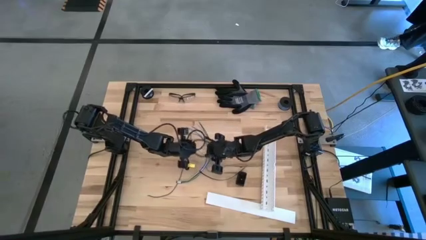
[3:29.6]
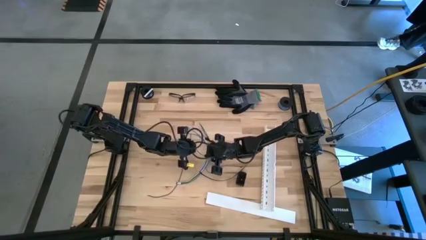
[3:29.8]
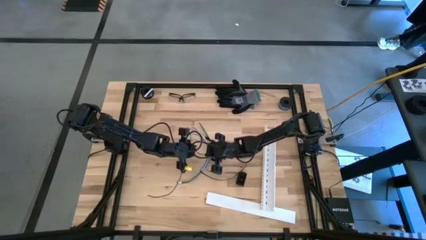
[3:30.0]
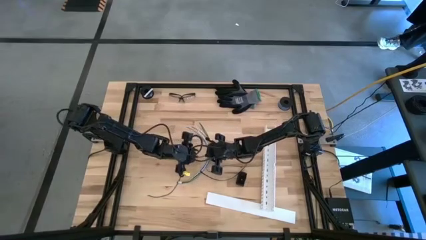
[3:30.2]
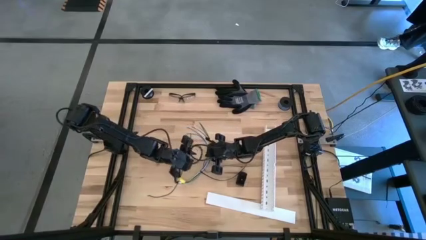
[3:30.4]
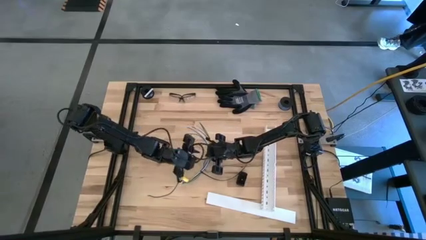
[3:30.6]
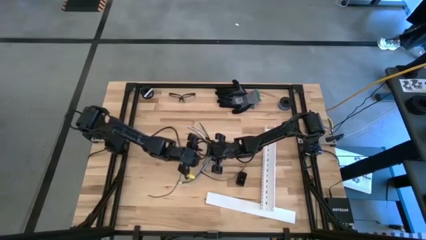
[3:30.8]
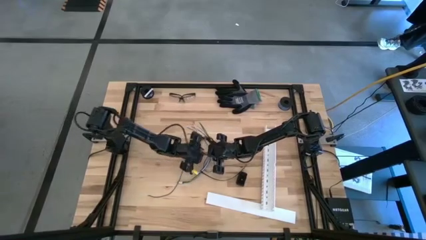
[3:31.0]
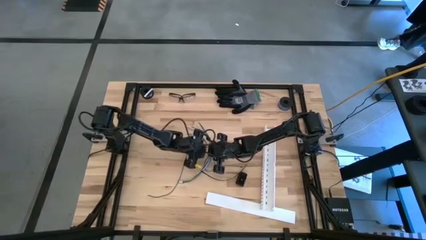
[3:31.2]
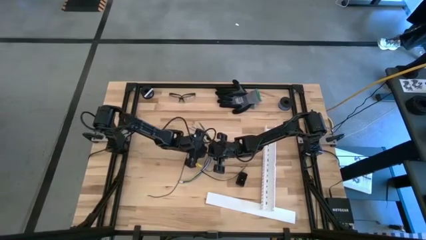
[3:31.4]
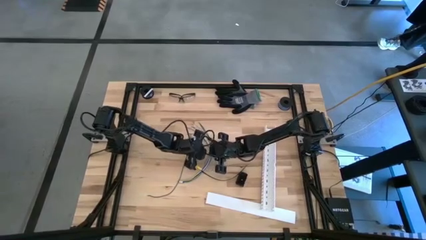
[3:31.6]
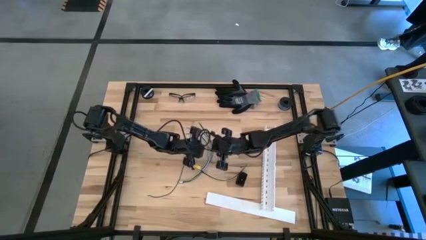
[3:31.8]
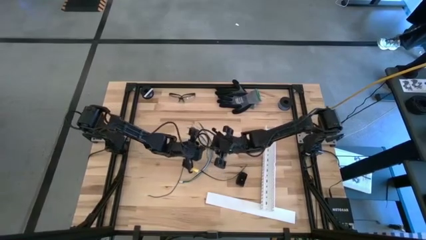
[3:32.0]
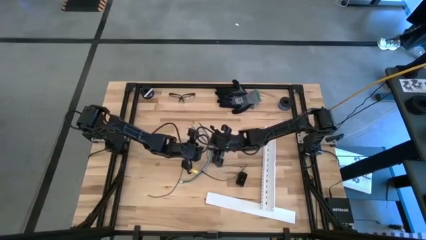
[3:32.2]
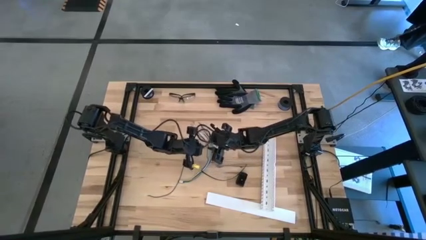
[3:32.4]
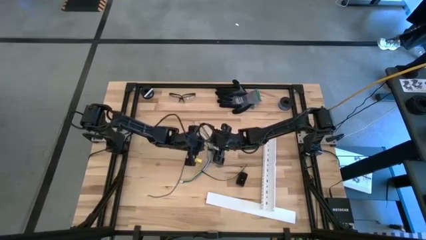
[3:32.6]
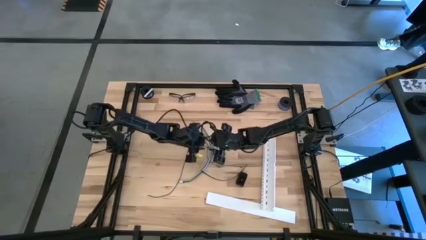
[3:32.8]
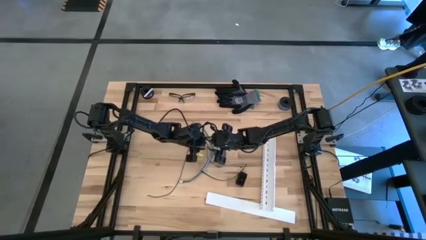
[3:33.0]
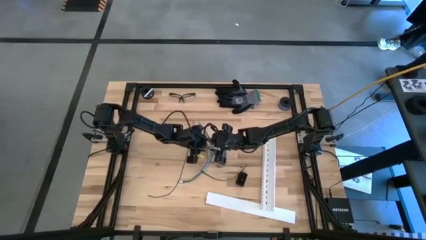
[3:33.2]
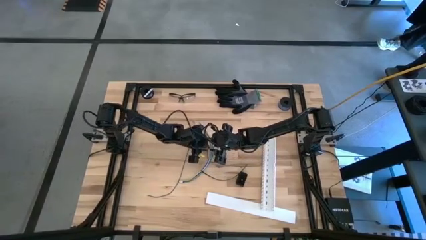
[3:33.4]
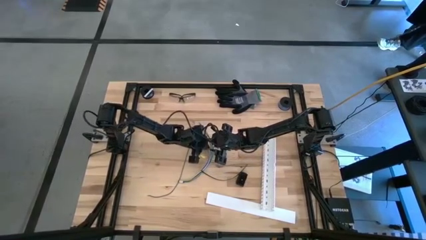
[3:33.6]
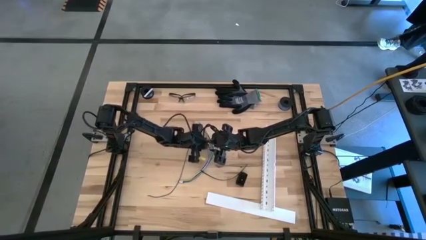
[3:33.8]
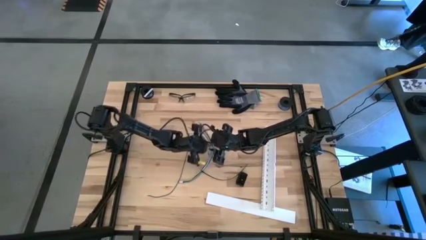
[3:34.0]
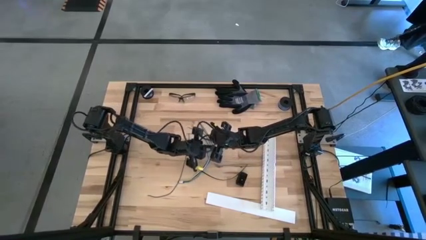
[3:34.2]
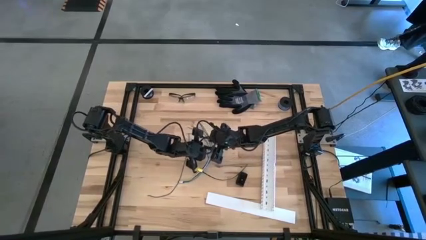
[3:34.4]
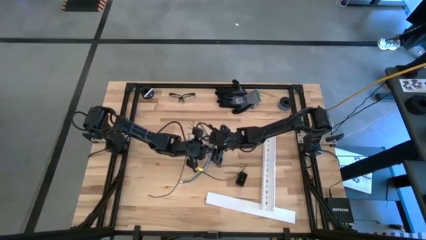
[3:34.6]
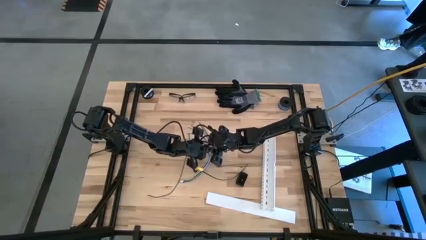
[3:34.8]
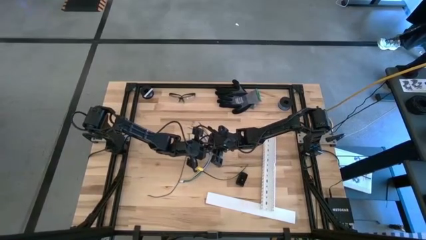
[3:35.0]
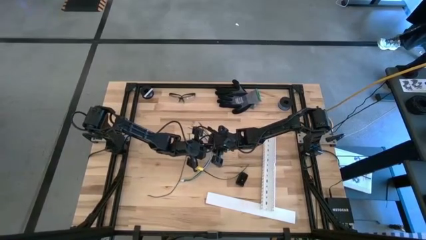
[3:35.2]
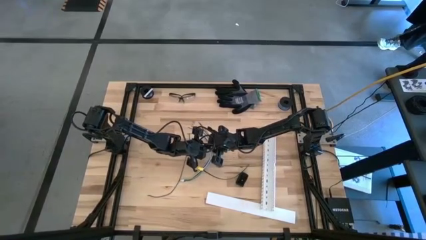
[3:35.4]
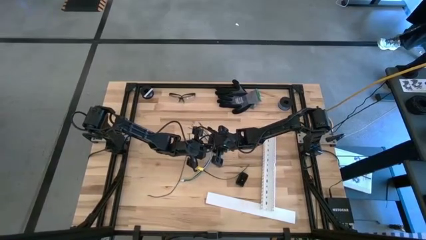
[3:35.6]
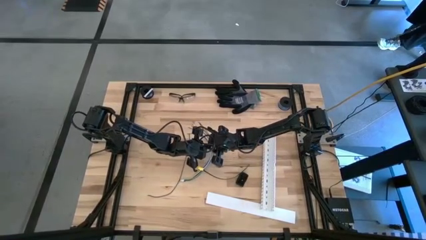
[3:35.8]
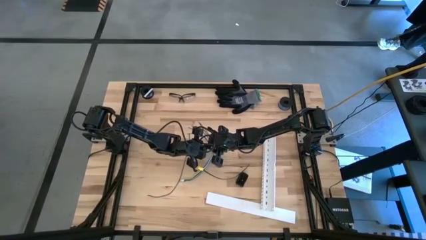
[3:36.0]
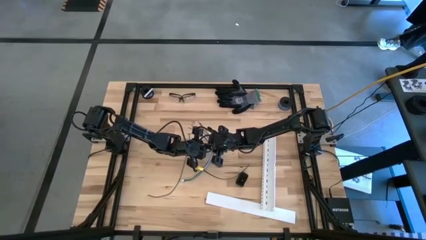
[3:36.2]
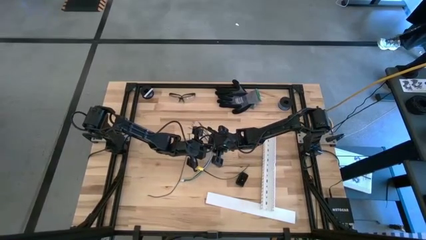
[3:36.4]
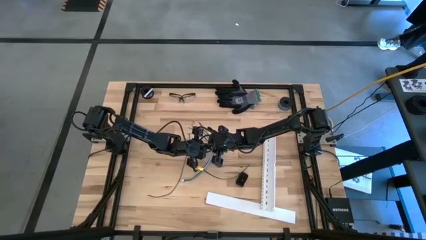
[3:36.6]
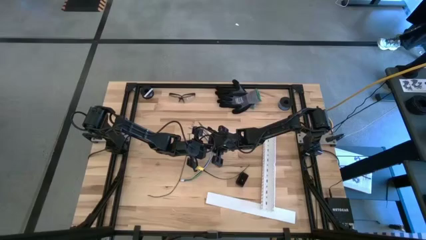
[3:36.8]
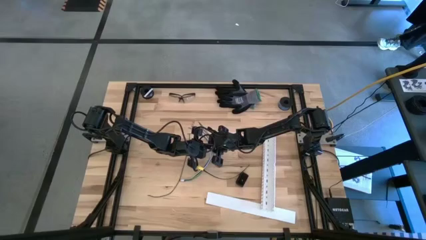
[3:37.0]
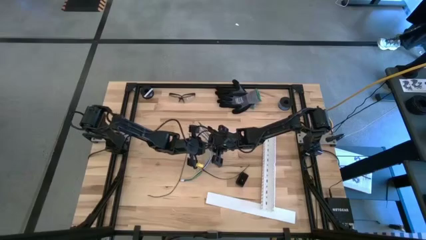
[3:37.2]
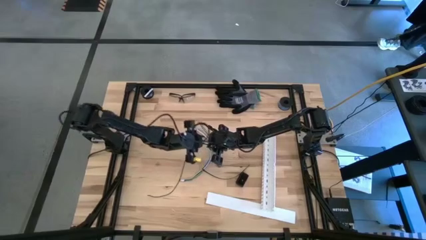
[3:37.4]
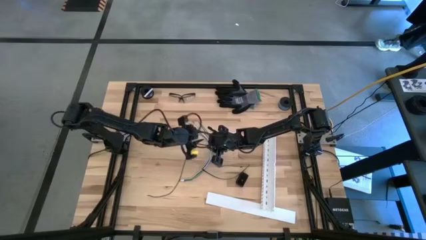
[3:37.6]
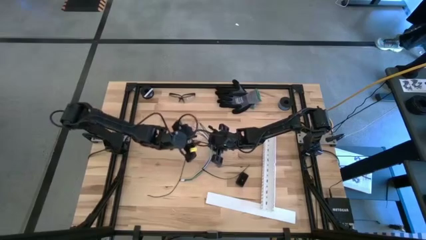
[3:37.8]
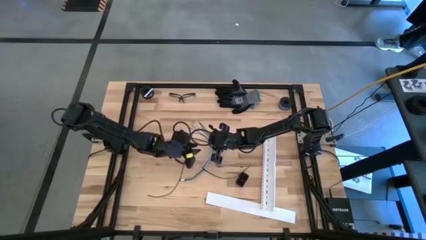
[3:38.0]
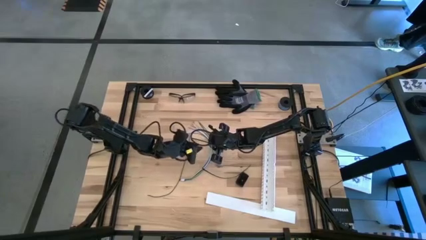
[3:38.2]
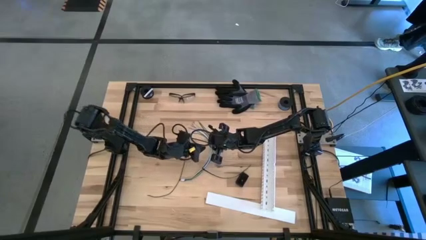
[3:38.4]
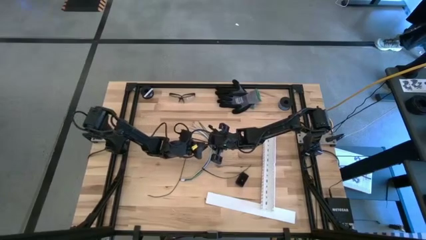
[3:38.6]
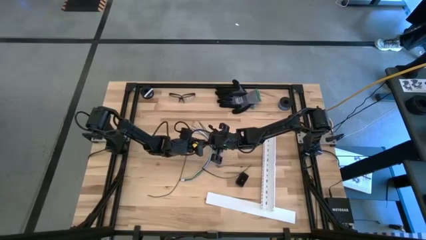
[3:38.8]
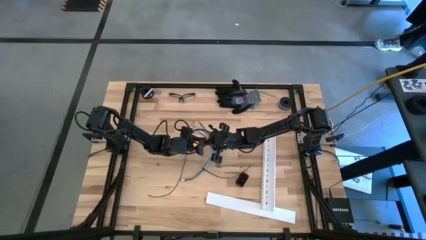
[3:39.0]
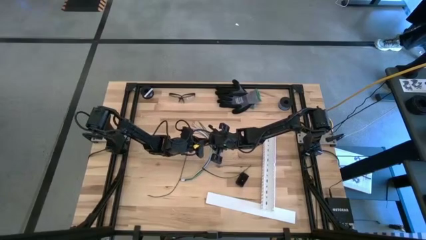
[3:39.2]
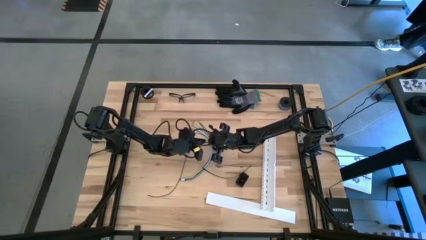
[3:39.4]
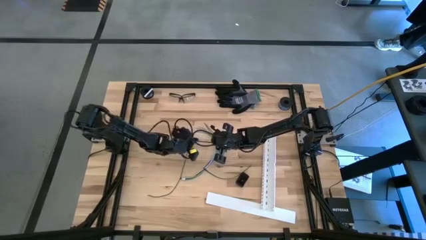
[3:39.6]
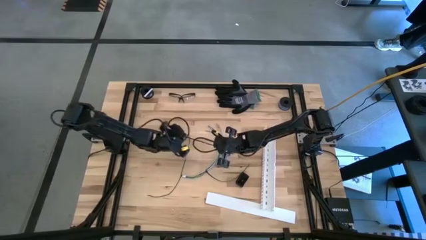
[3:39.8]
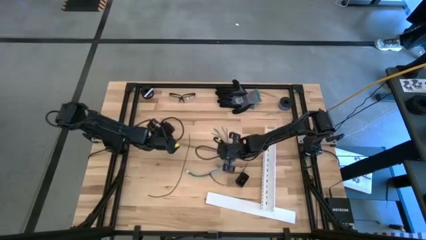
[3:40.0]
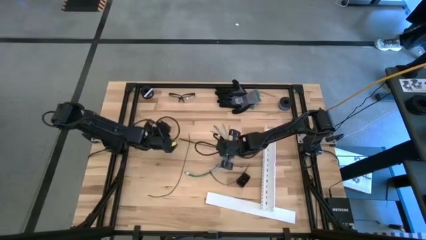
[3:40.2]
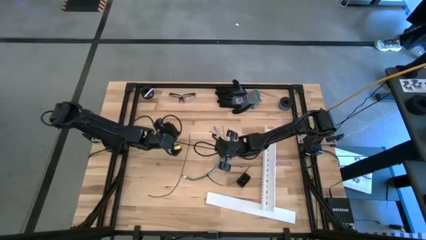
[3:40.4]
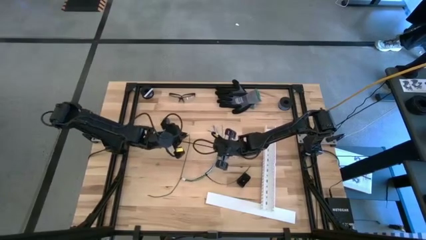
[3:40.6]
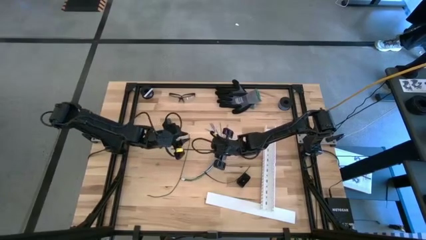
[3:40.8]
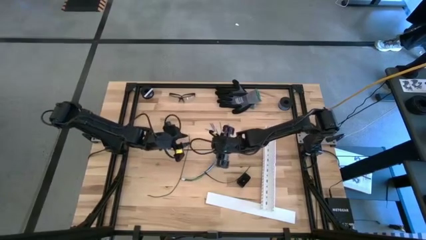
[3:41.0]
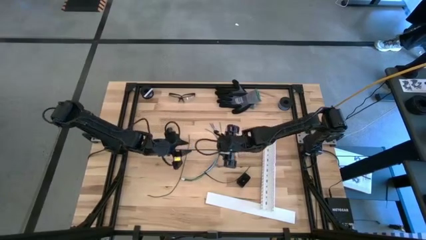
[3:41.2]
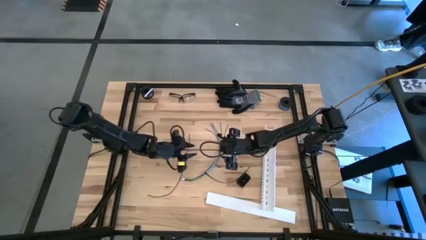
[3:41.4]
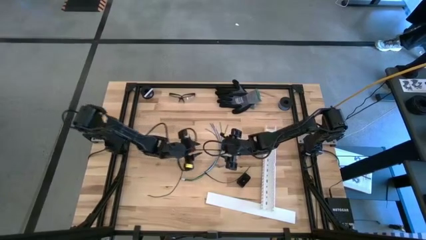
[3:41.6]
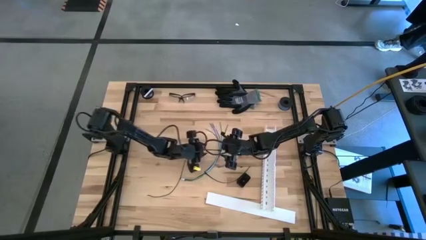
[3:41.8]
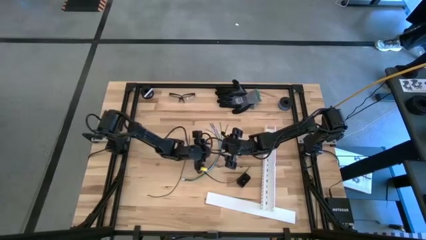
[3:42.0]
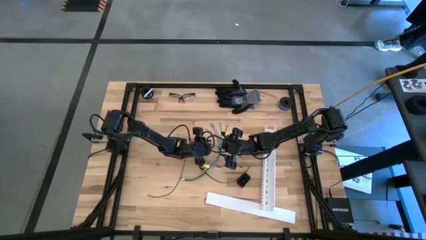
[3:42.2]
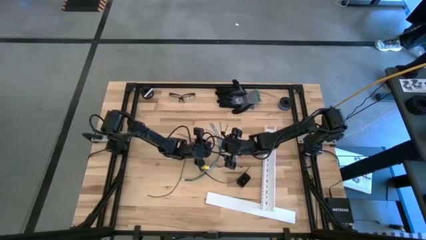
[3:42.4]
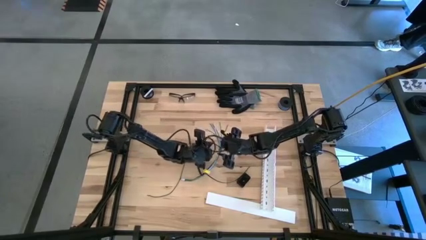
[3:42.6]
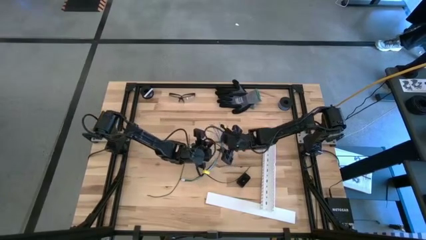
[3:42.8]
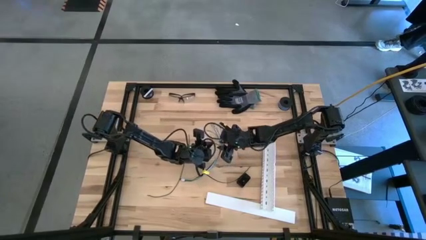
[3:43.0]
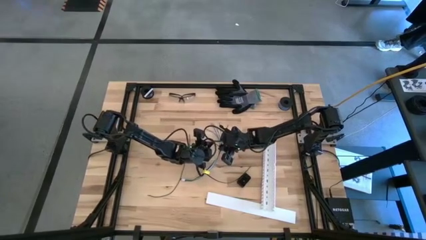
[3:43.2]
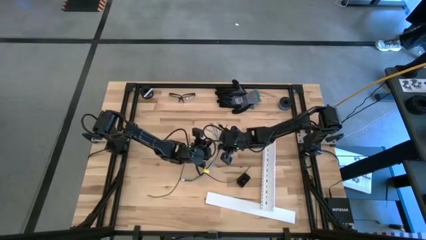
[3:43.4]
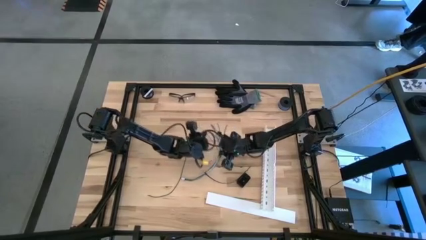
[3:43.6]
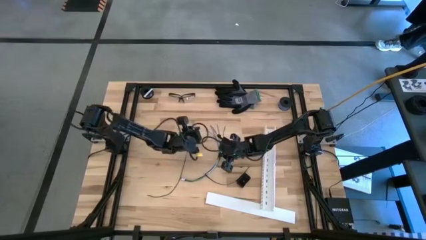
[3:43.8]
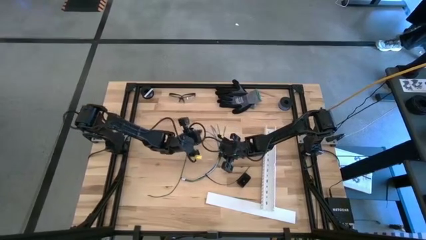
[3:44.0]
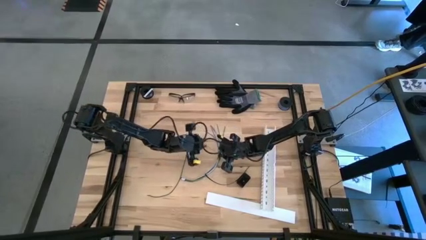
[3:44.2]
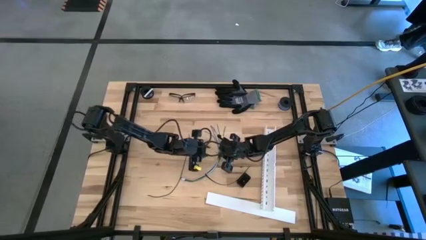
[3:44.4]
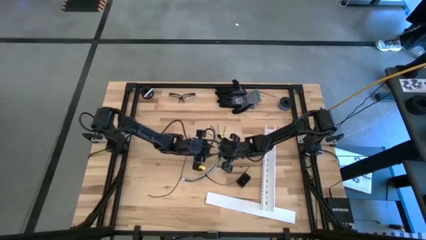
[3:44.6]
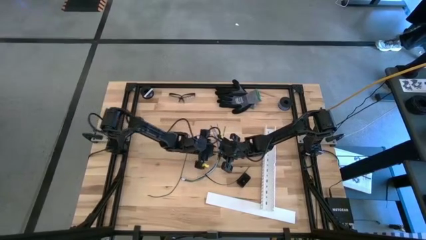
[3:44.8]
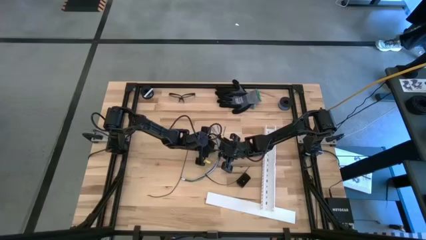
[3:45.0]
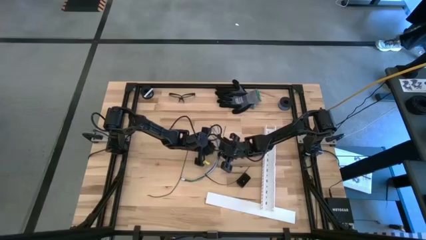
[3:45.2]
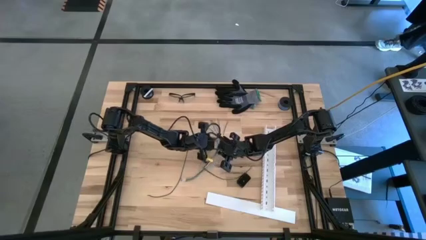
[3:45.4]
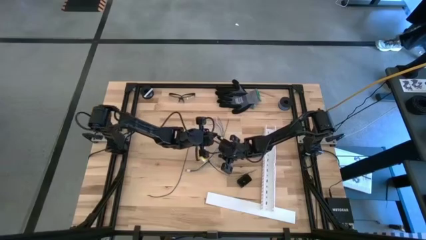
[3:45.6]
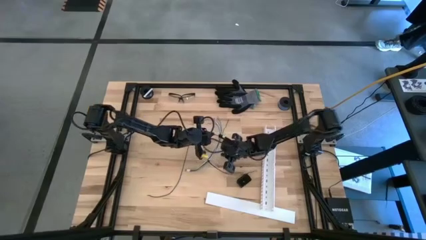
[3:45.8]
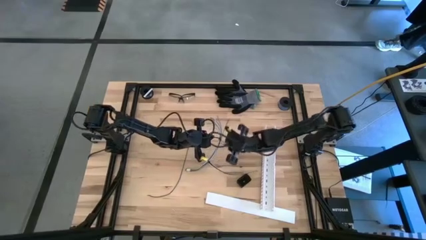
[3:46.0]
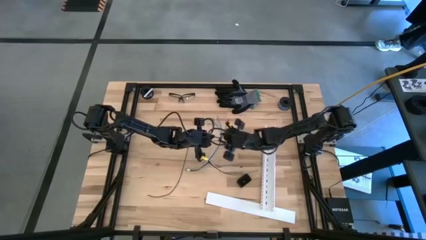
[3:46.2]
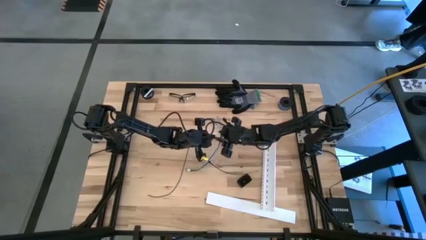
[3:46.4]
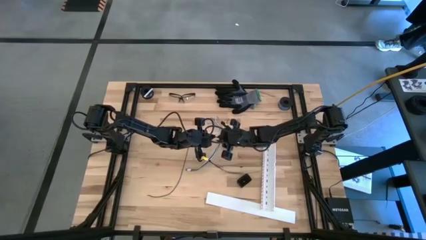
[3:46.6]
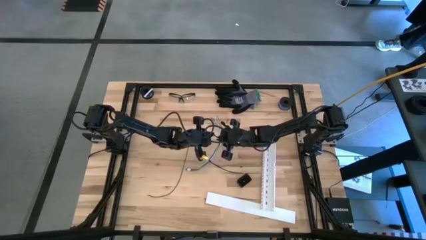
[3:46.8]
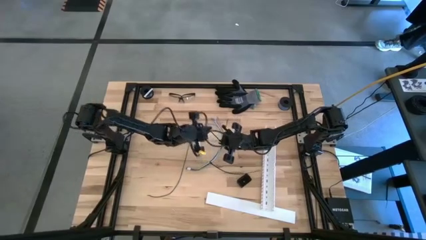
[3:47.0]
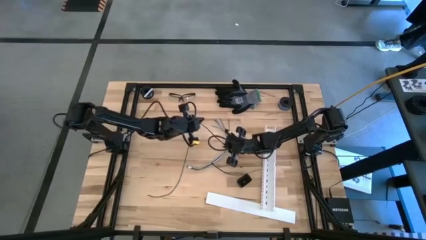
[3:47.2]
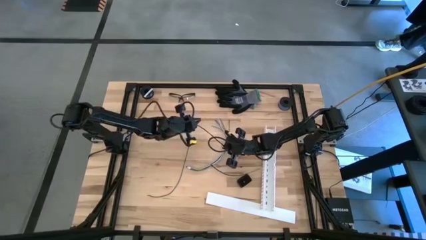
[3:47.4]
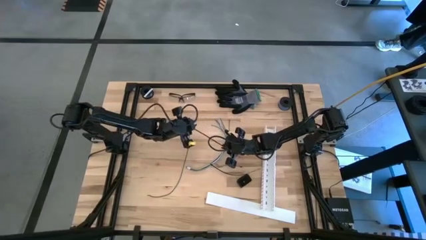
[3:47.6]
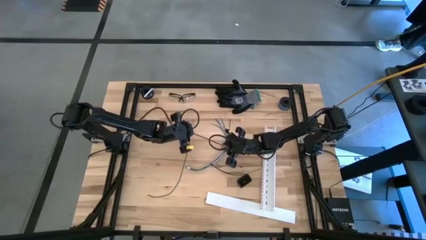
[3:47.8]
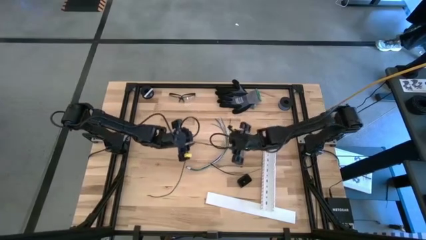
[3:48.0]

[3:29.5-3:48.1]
Task: Ziptie cables
Wrap the cable wires with the black zip tie
